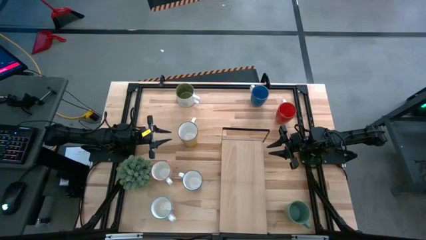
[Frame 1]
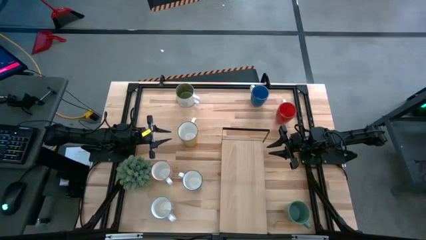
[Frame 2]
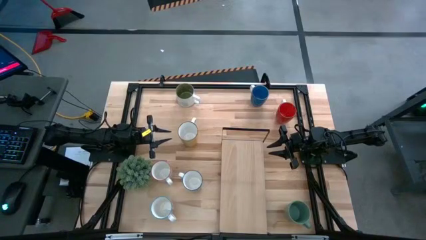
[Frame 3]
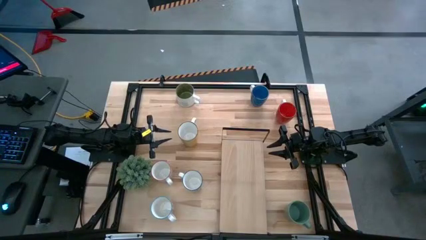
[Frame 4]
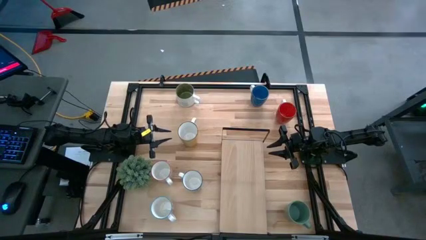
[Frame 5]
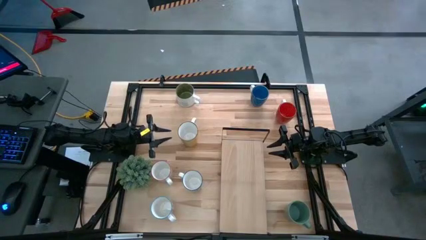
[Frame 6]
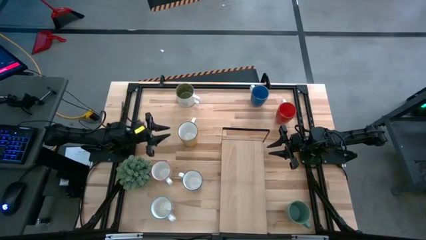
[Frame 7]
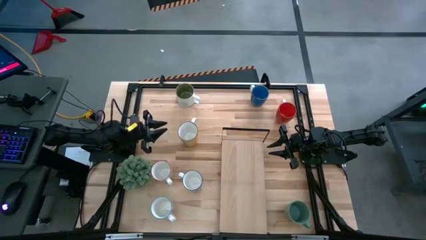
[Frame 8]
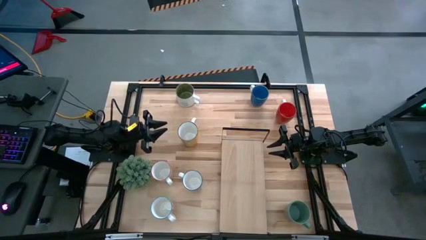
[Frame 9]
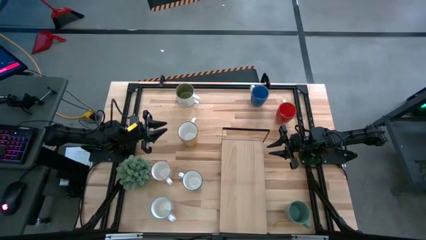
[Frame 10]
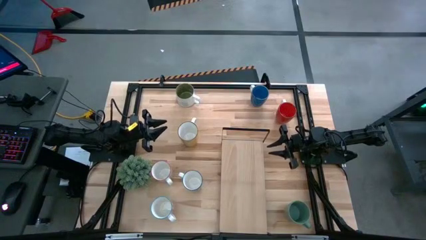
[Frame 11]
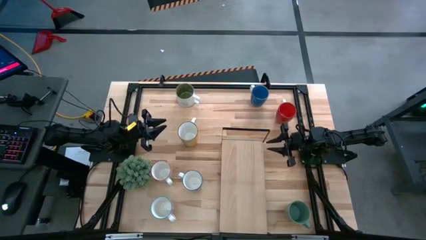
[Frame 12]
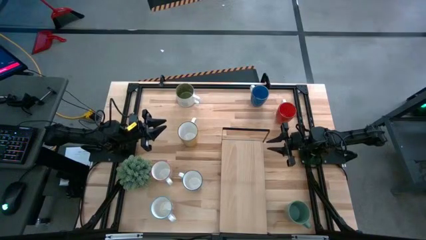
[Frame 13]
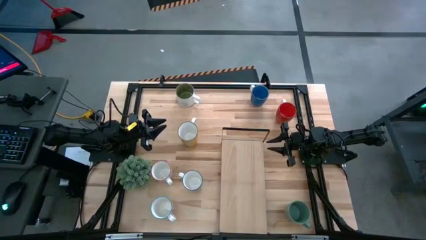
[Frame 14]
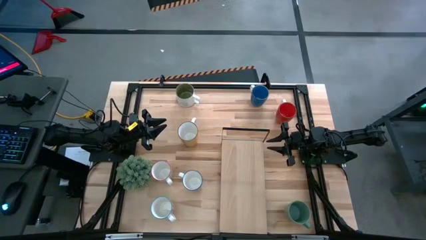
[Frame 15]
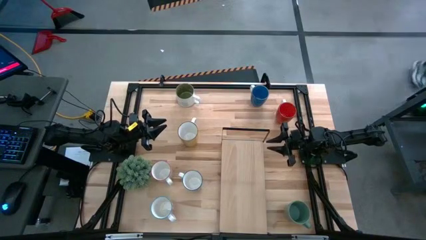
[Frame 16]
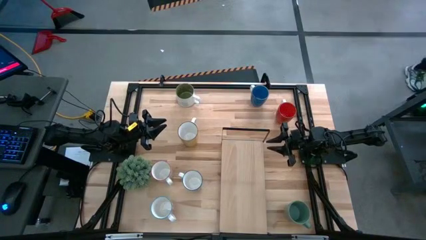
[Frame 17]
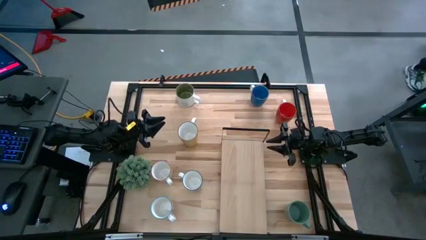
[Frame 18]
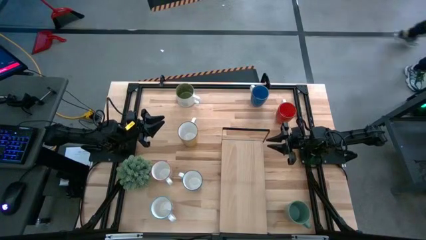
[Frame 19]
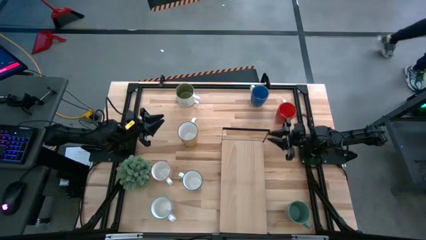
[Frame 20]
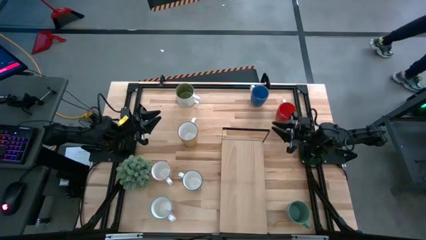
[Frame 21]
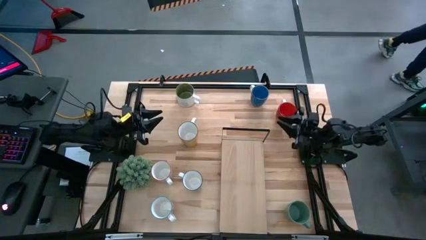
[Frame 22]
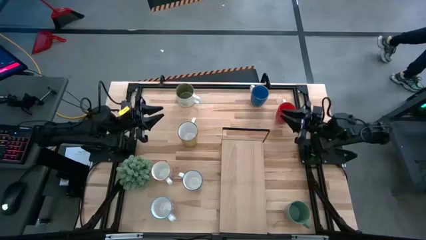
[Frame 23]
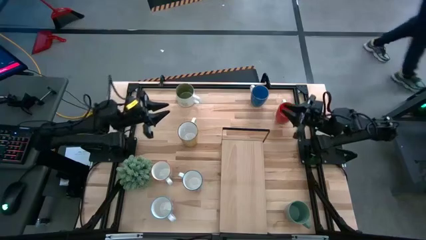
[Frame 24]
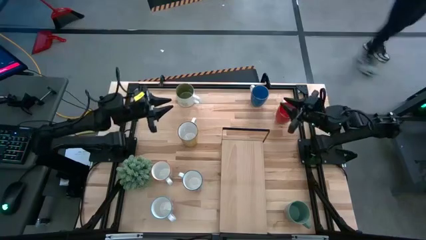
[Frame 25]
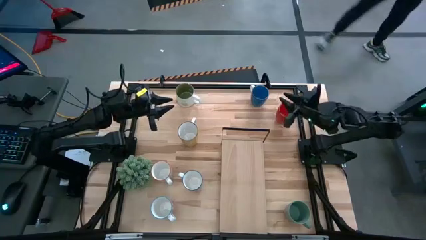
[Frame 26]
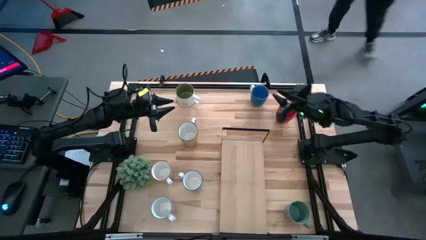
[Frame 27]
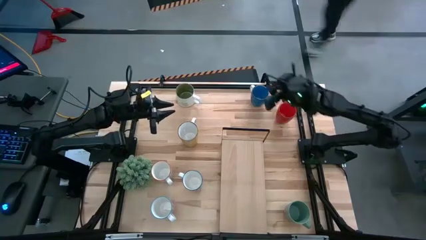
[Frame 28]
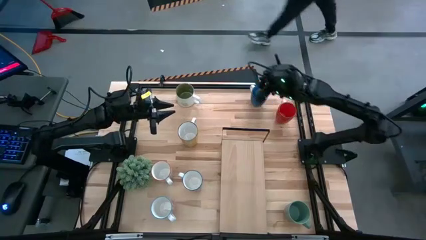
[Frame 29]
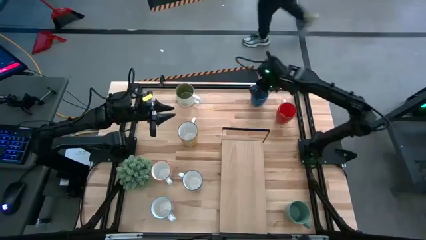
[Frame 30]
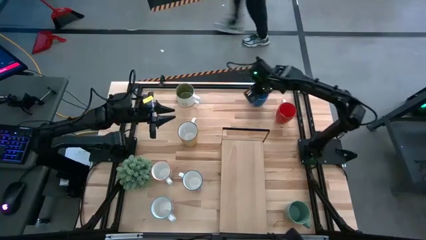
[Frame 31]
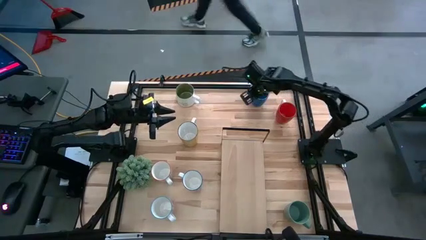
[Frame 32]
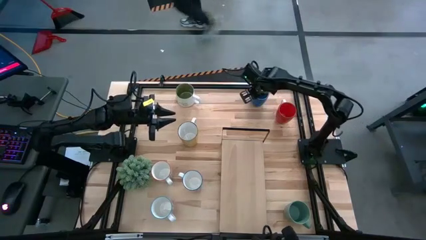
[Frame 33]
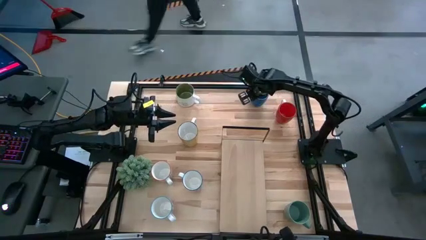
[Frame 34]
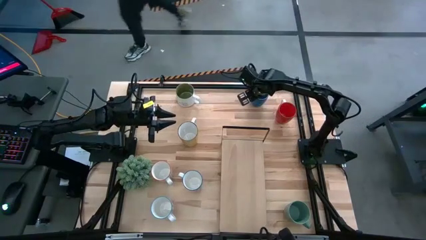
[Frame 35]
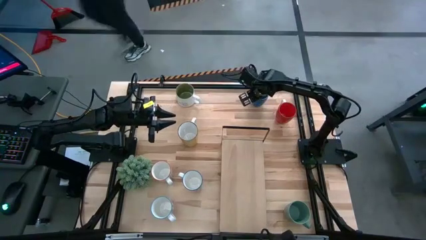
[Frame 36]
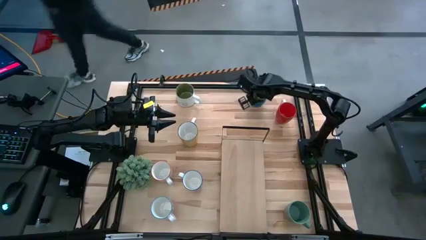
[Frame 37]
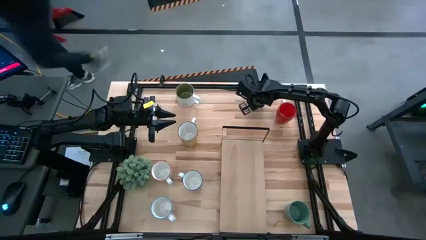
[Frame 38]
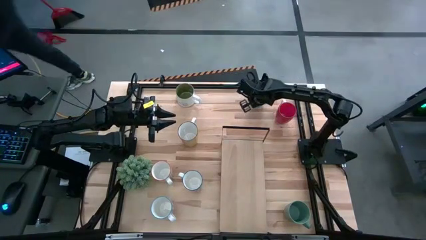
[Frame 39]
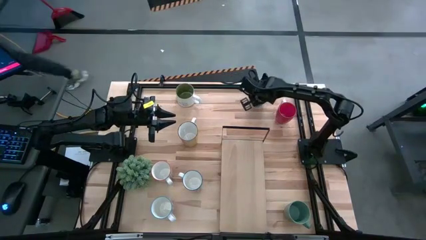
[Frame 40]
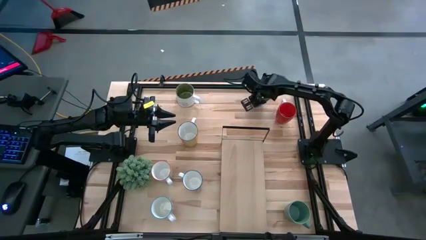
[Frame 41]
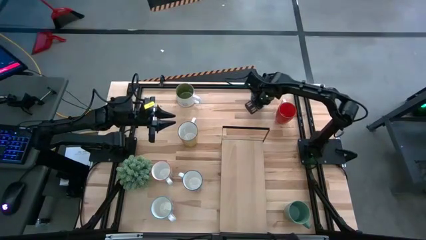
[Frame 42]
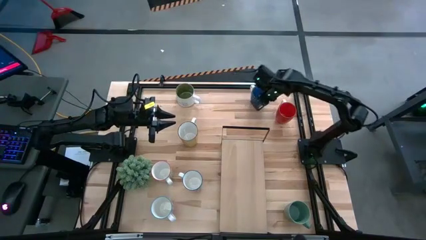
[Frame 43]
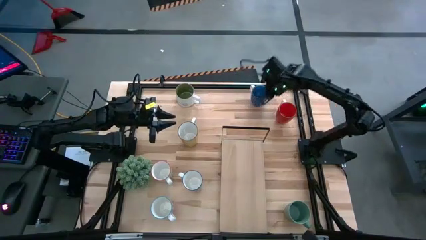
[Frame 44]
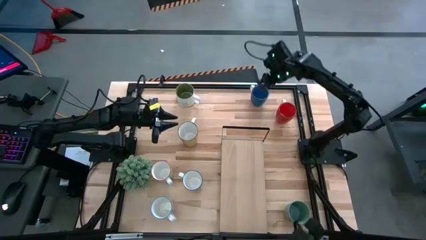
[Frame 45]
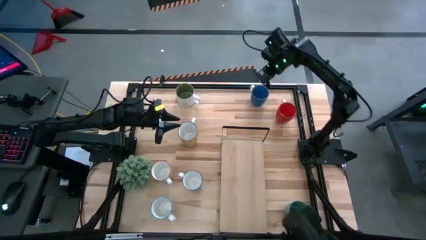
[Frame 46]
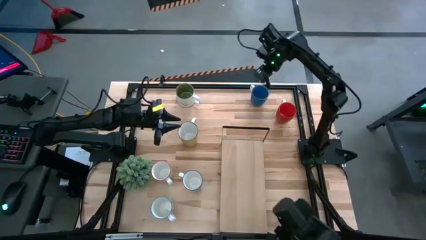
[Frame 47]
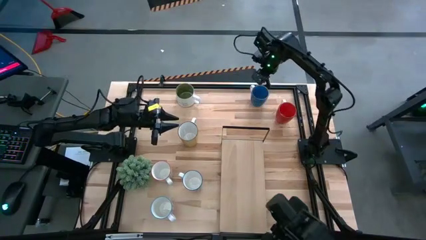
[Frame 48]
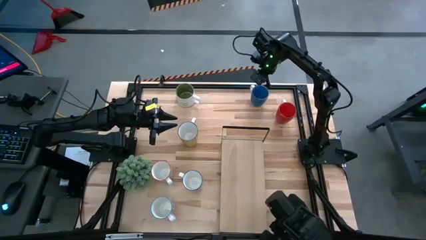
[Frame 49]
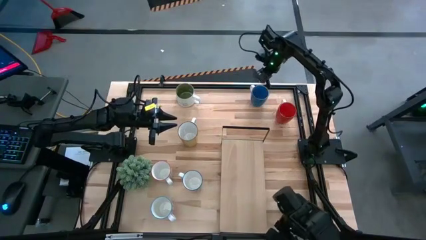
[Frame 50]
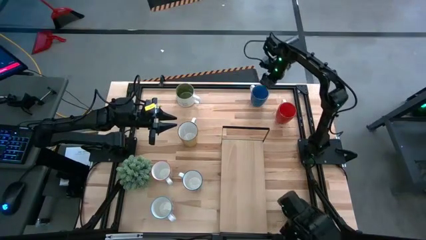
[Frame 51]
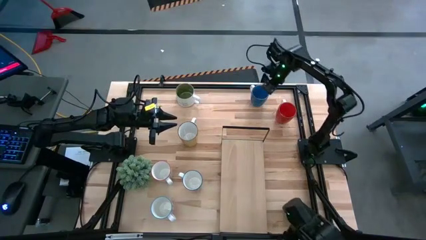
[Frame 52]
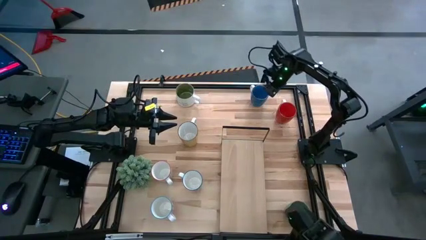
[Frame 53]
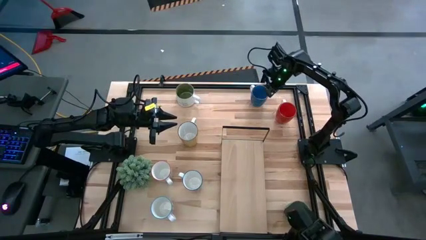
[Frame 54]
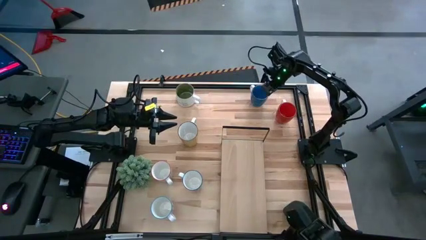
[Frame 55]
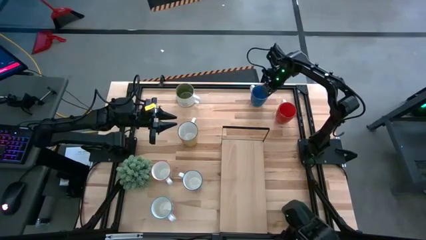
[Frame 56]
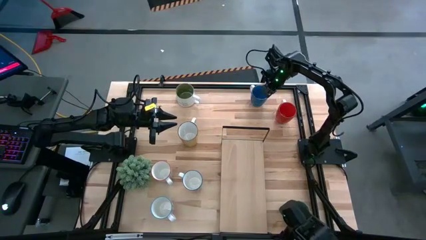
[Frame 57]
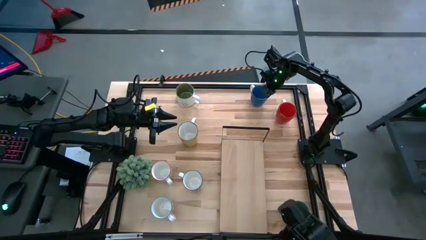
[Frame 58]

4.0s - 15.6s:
Task: Place coffee mugs
Put the blue mug on the shelf
